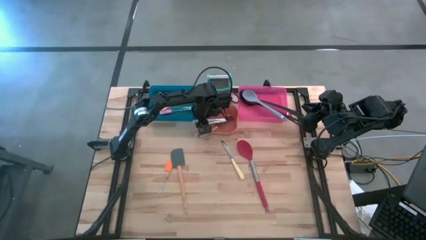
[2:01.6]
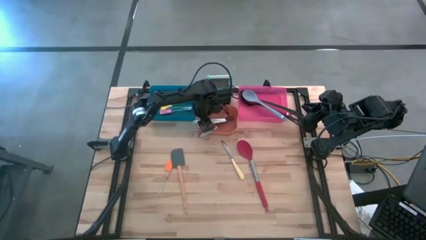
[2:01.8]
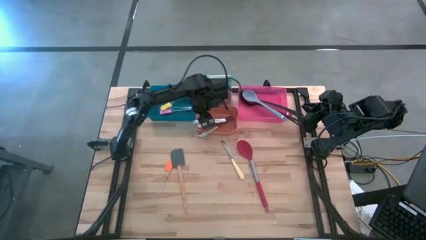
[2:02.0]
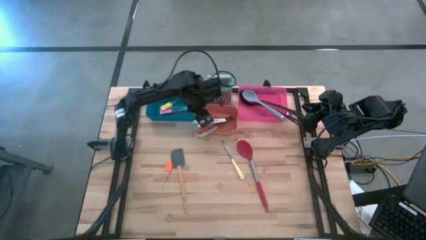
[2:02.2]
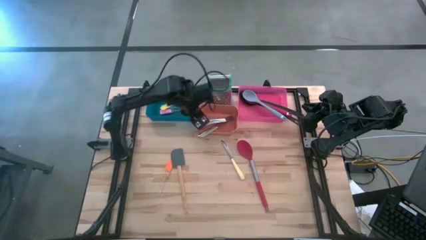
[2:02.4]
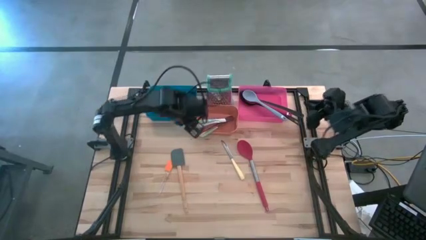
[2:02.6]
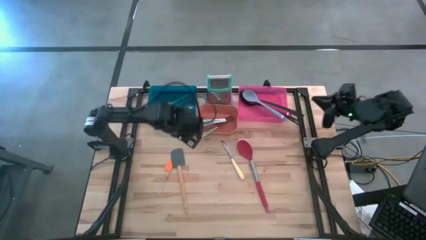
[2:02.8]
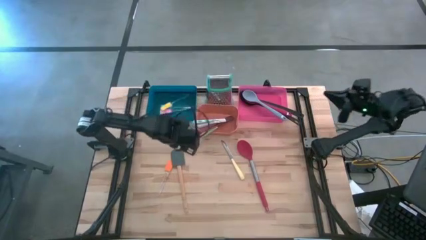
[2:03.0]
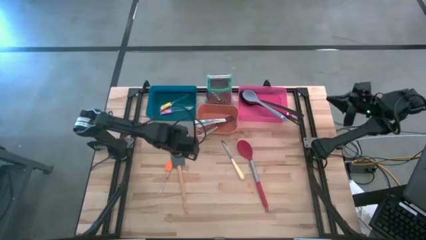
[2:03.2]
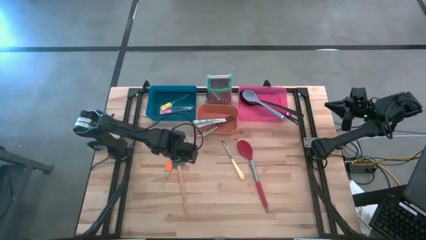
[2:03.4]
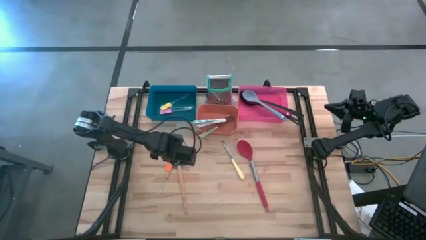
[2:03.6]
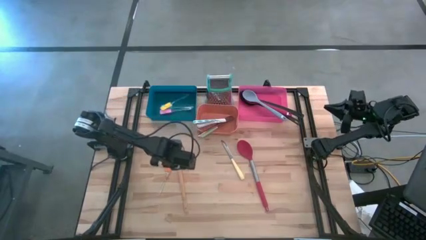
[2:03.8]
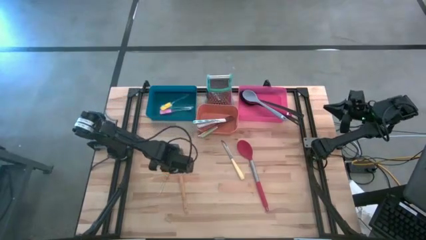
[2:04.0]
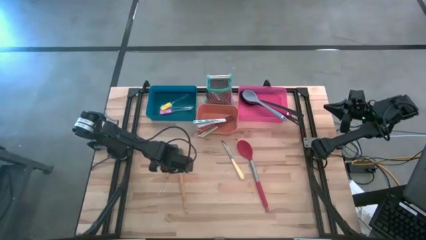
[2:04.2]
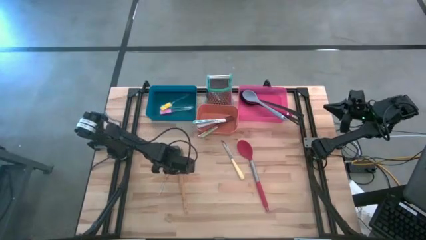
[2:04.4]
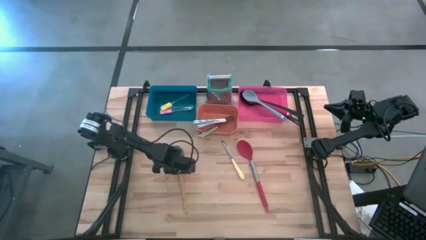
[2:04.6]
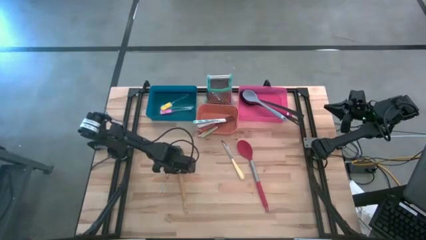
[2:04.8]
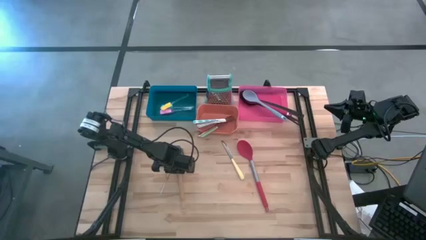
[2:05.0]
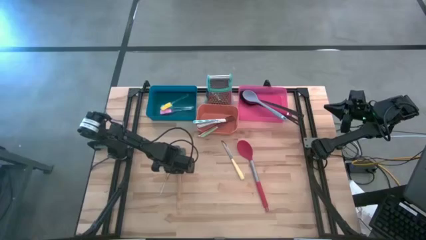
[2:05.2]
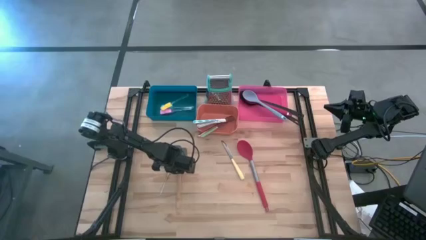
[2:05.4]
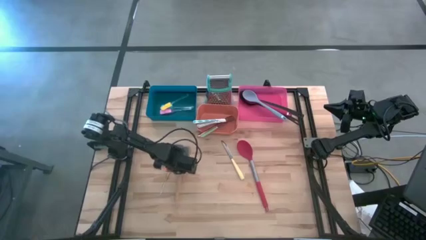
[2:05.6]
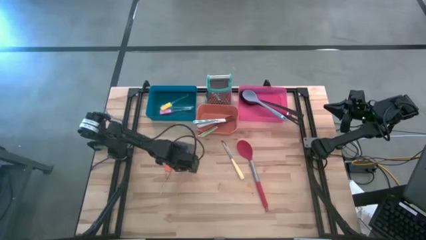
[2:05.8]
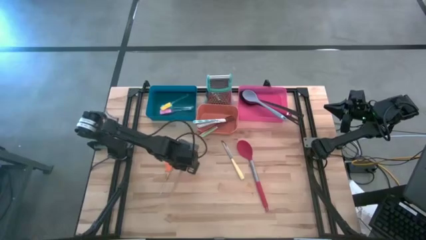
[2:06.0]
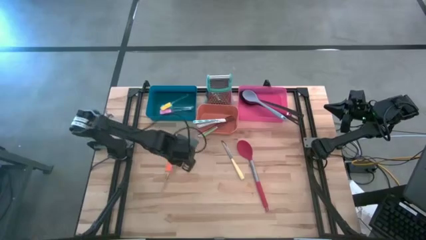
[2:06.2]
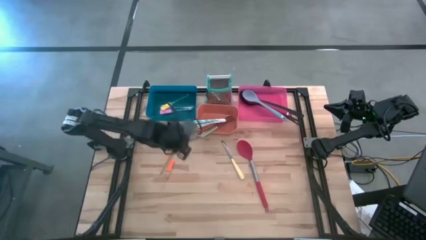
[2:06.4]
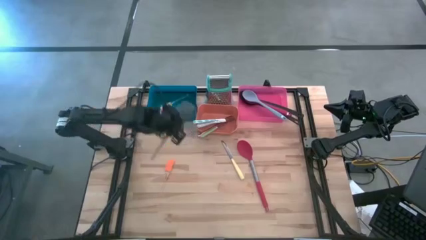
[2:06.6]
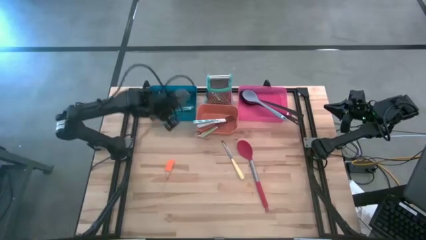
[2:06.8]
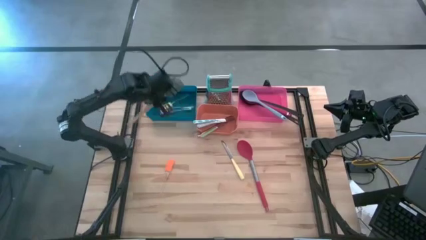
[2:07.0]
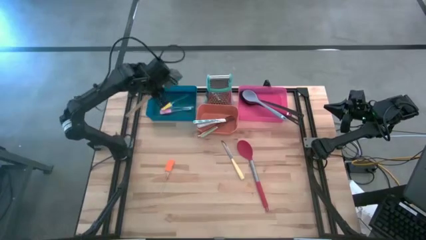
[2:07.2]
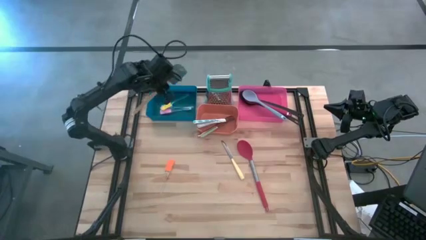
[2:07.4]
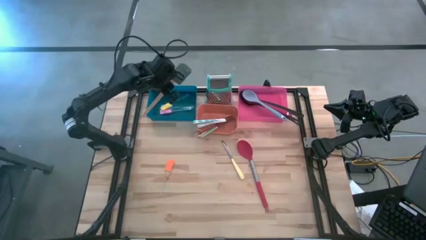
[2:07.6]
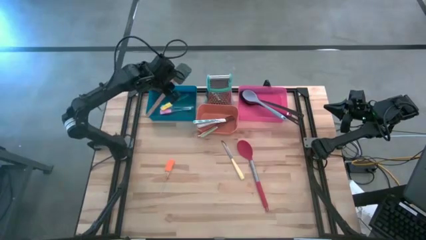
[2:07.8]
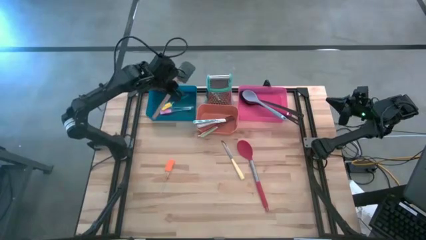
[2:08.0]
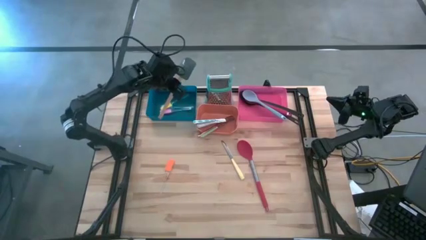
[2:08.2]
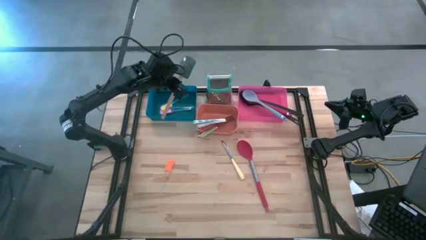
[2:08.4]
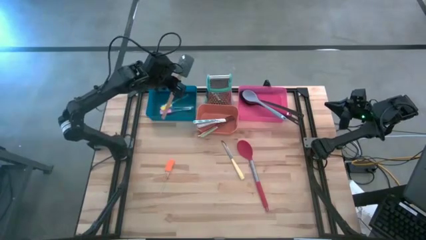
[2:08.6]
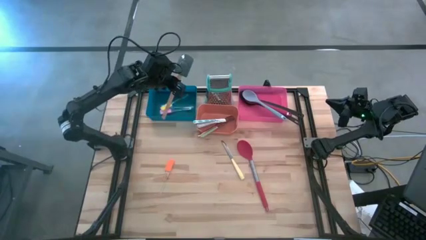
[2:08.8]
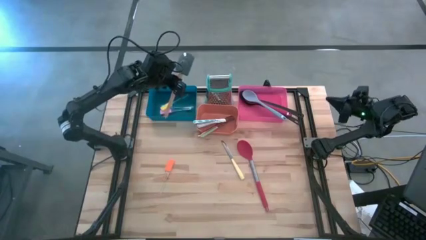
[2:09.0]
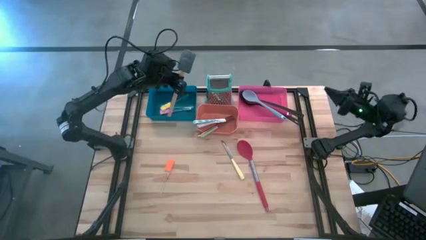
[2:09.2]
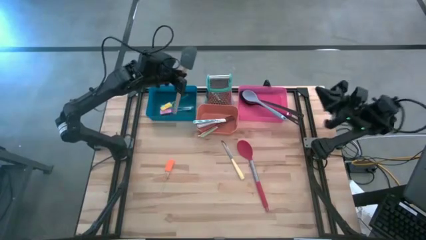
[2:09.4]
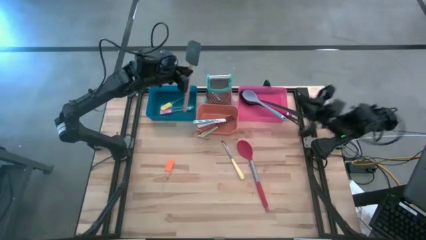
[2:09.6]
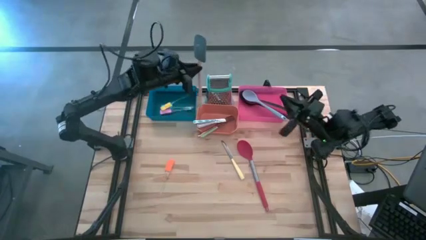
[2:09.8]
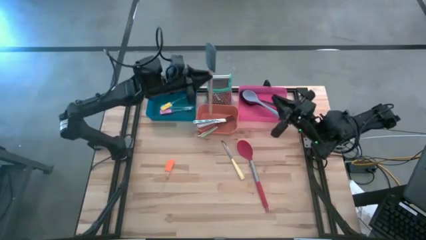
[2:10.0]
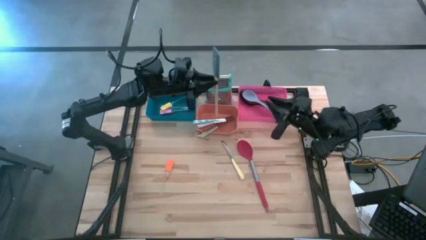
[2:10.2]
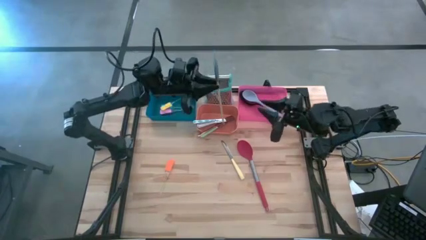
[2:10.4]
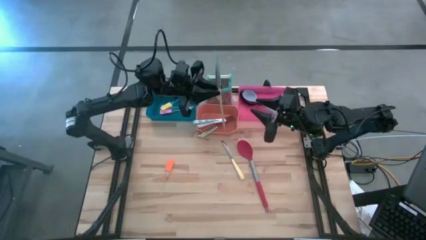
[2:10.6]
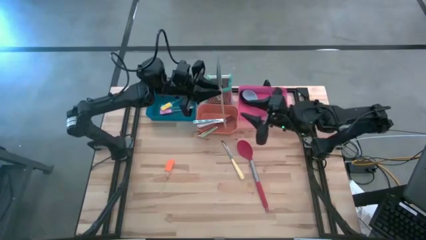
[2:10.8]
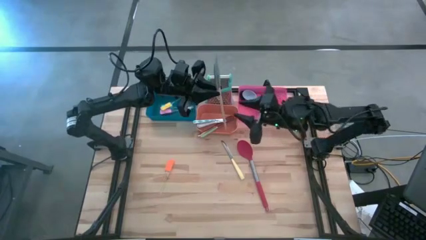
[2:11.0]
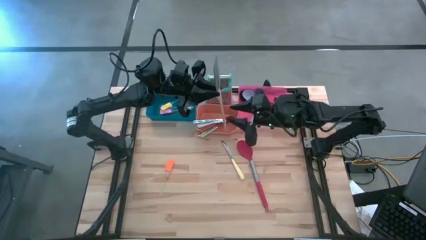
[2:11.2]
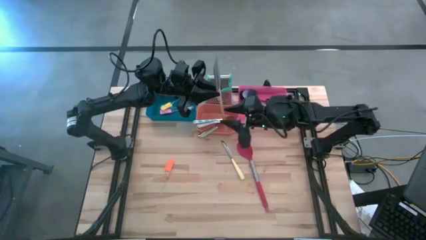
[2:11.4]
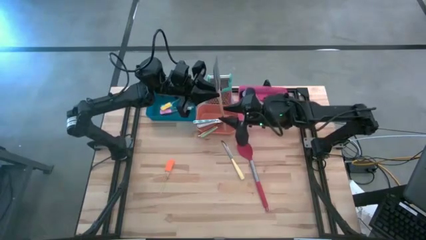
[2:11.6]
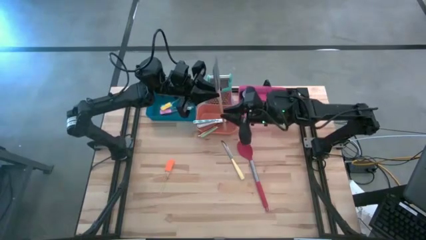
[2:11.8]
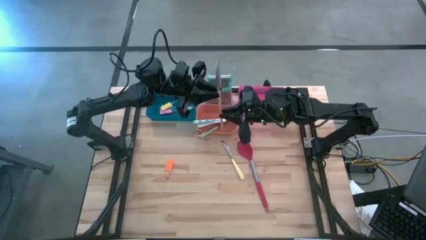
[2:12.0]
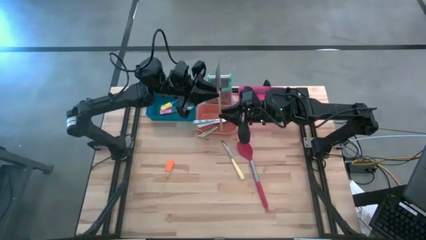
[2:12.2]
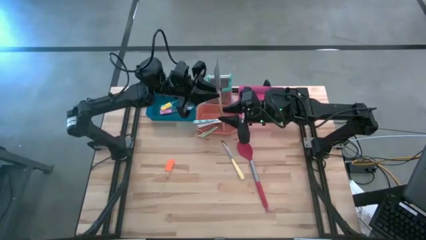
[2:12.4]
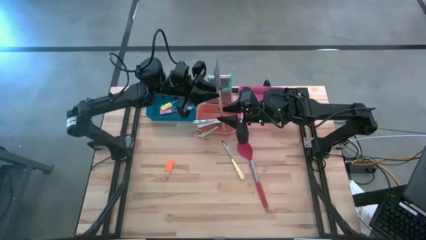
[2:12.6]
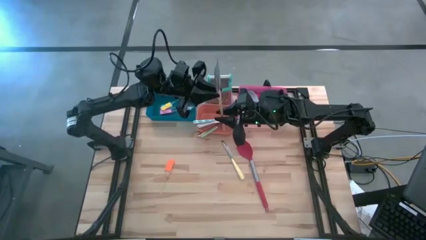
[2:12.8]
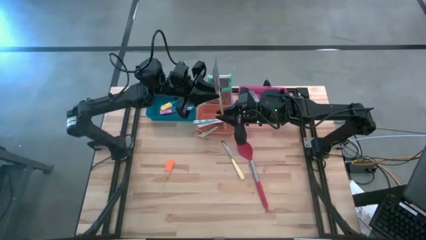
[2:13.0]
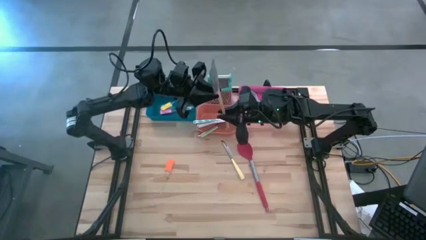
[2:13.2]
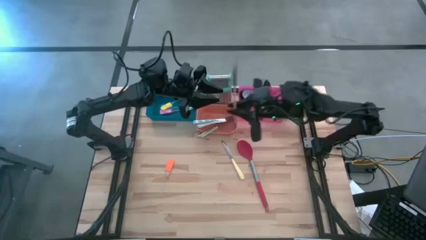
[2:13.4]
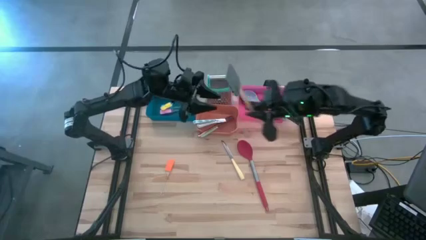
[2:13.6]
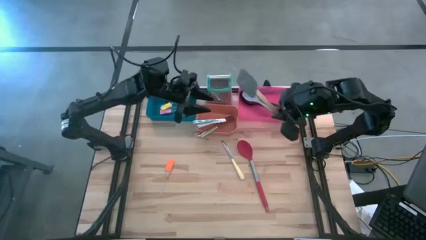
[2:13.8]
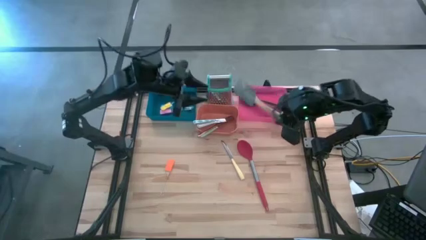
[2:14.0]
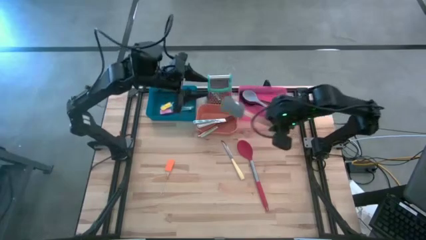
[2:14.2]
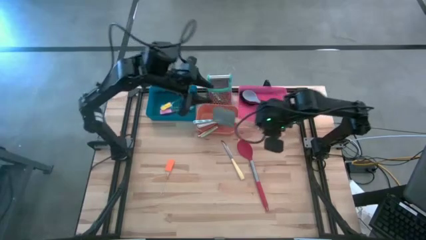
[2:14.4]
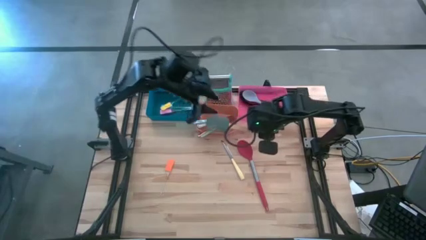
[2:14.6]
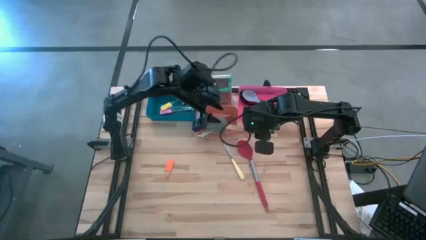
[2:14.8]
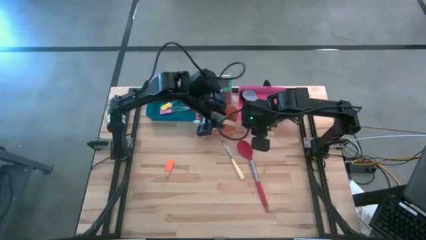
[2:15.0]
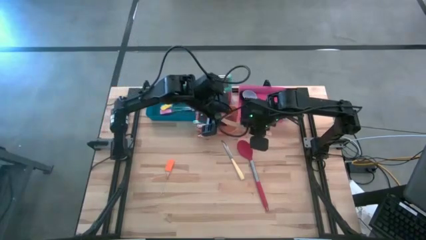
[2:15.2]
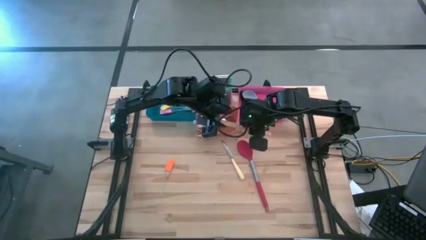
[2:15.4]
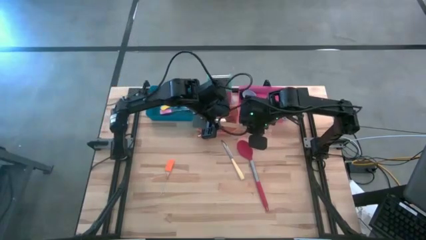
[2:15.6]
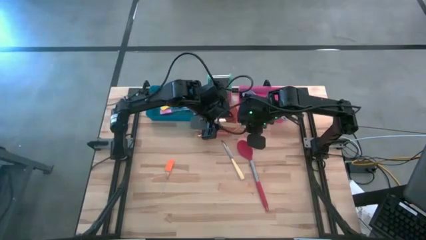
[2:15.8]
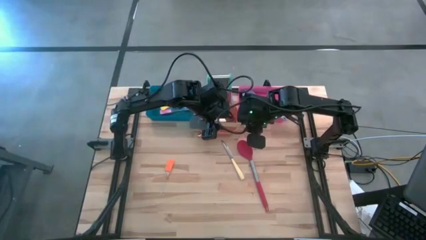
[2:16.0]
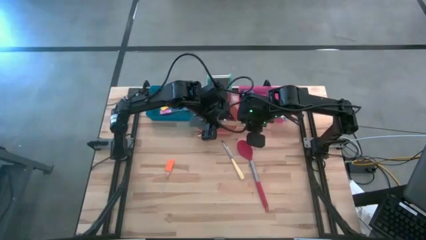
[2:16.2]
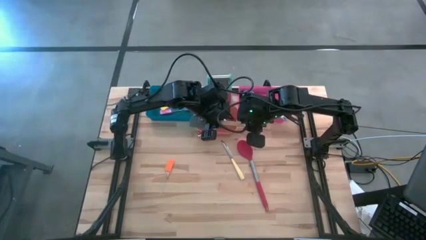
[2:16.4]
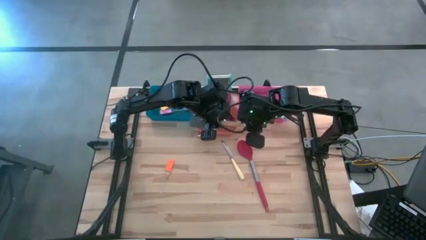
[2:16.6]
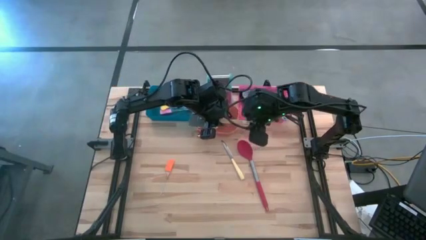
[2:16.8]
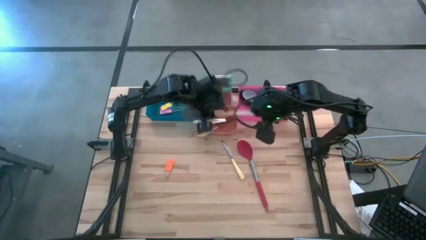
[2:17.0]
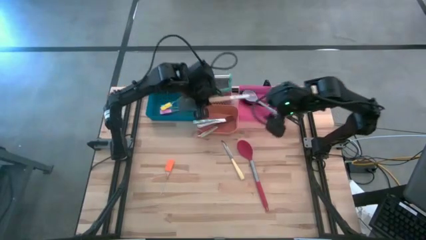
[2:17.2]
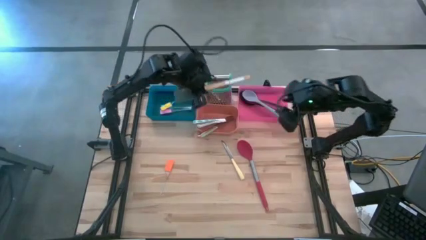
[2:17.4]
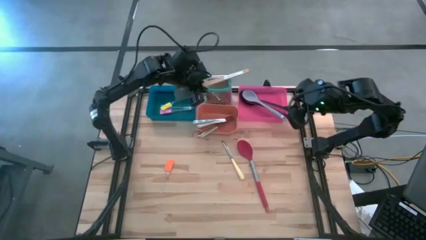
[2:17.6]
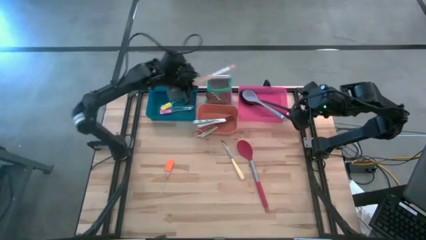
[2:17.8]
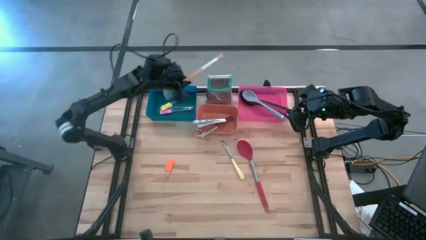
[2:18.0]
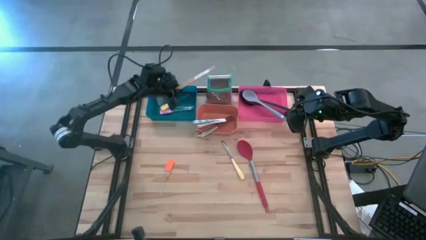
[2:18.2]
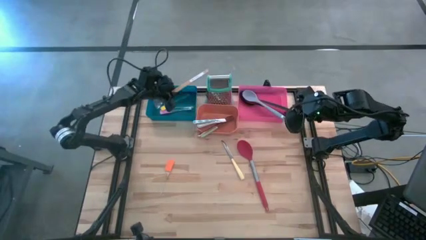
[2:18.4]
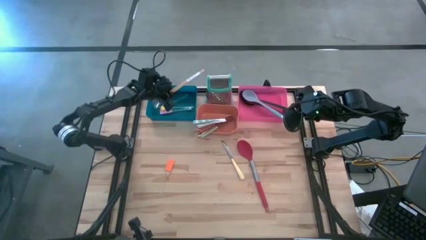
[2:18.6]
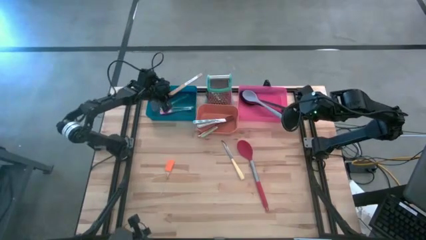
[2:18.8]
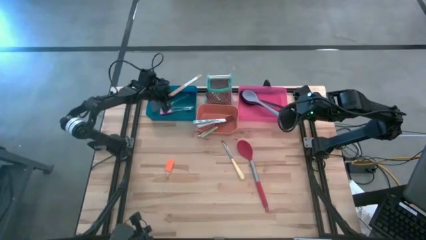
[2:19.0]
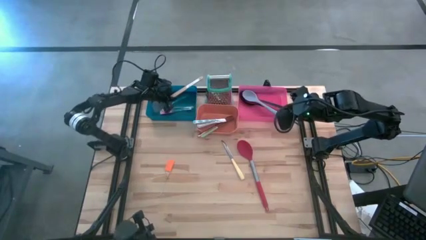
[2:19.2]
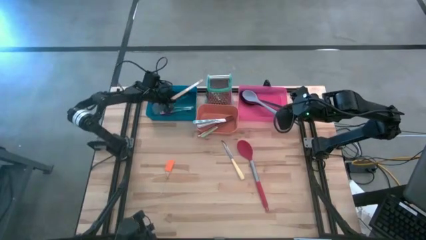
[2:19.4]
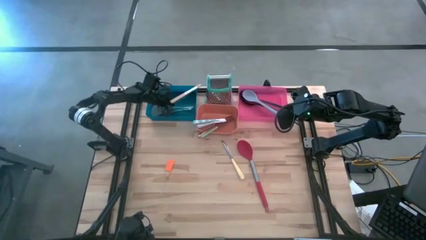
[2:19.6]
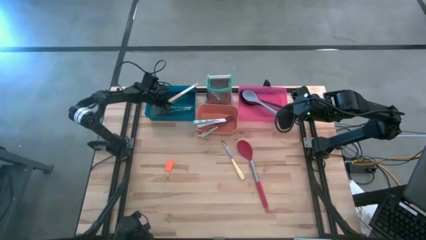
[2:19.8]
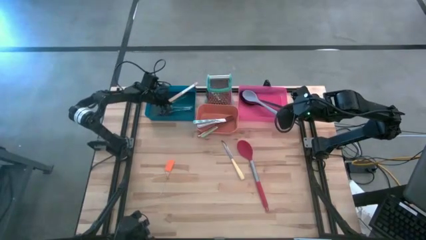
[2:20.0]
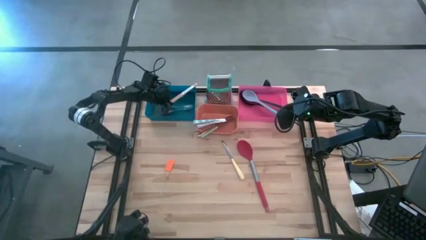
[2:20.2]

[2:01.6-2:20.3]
Task: Pick & Place Kitchen Items
Put the gray spatula into the blue bin
